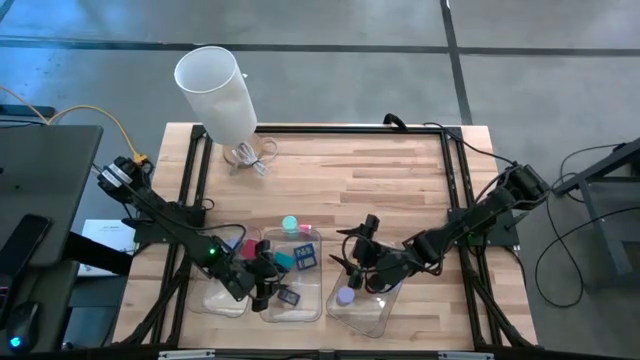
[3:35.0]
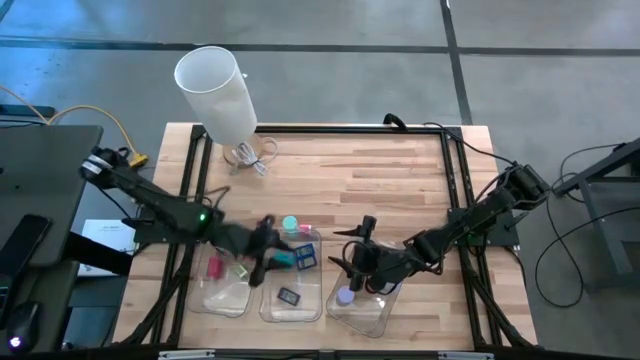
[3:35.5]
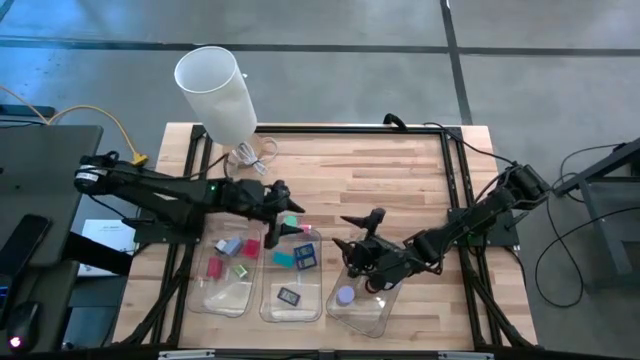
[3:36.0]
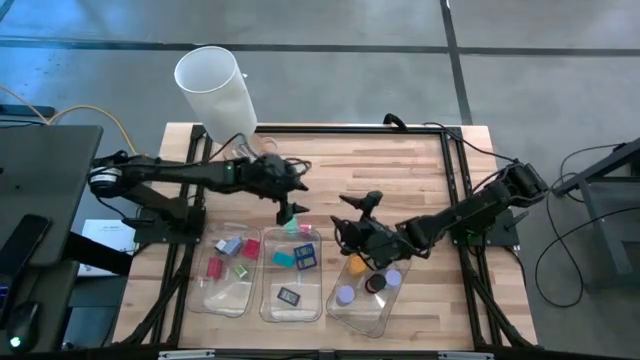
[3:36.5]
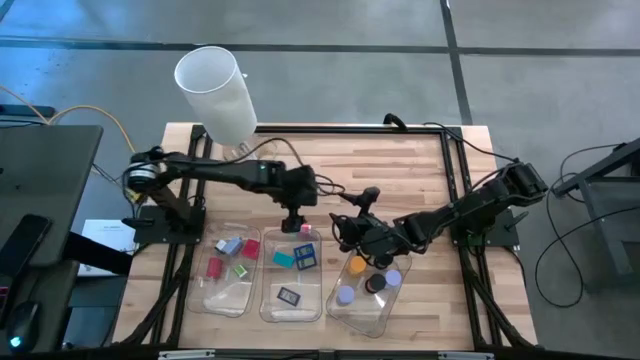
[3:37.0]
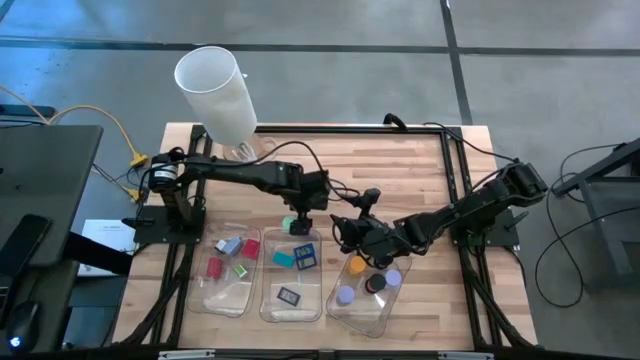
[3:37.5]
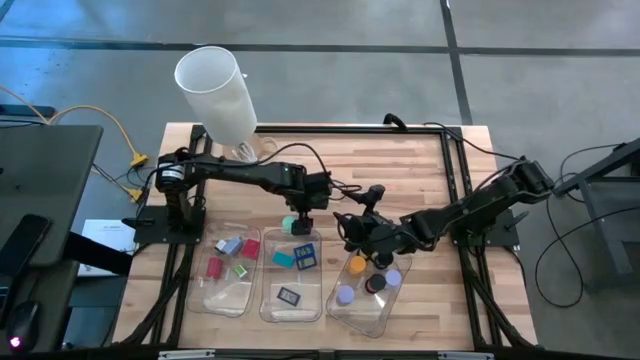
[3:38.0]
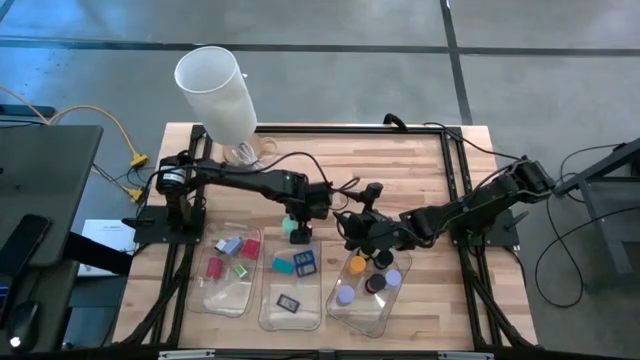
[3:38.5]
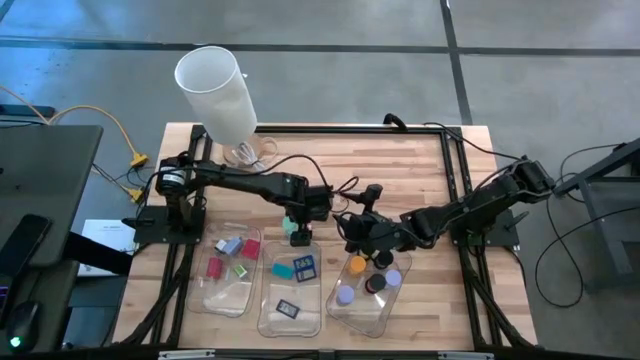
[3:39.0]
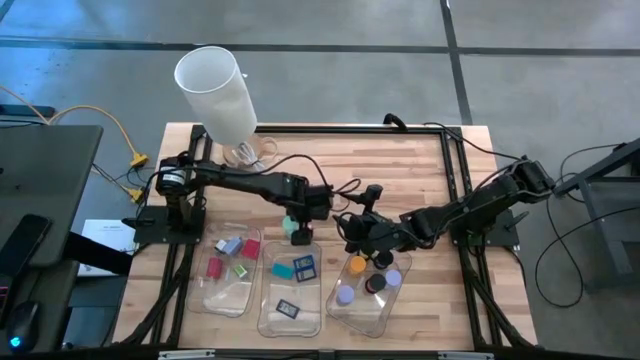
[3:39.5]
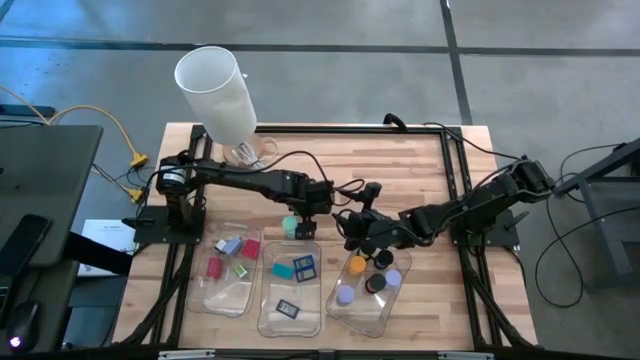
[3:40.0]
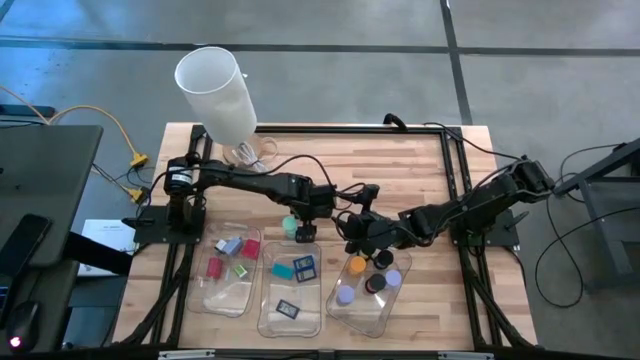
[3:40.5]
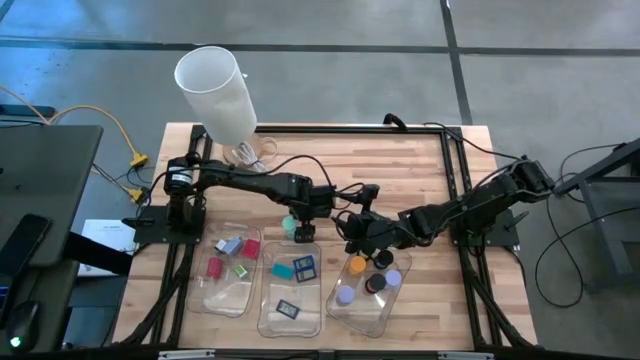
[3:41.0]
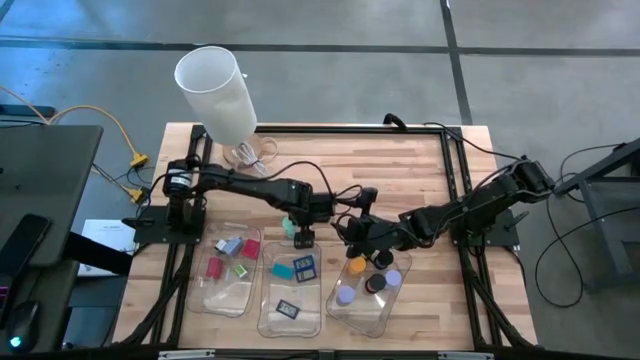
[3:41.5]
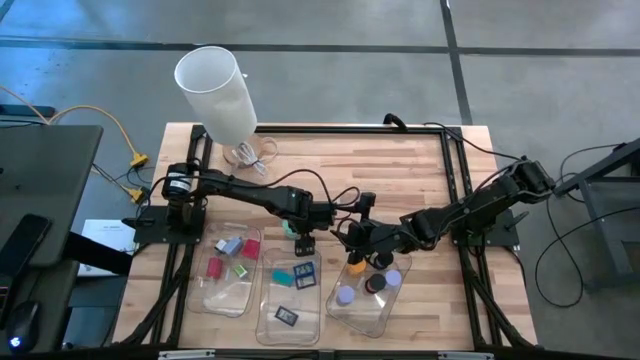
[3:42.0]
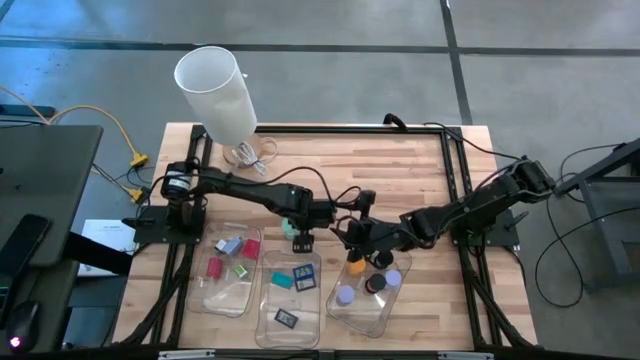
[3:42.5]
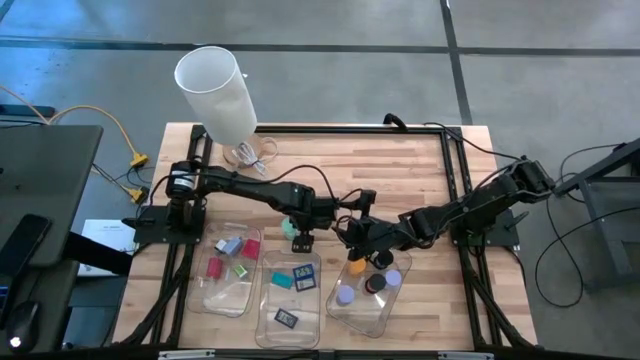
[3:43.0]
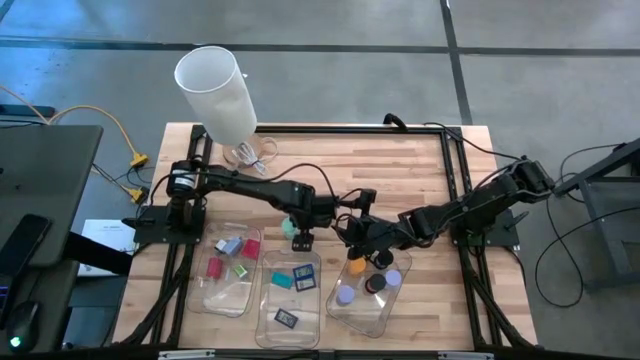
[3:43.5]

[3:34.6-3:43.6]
Task: Pick & Place Office items
Adjust the middle bin

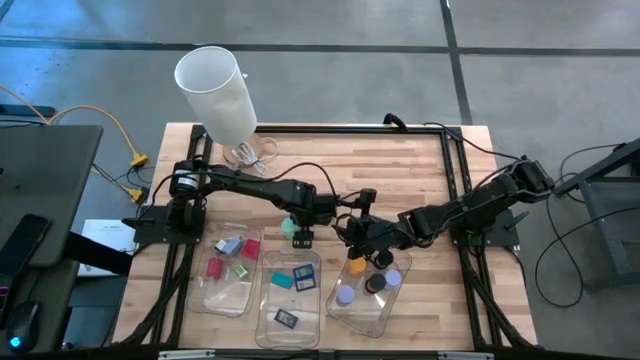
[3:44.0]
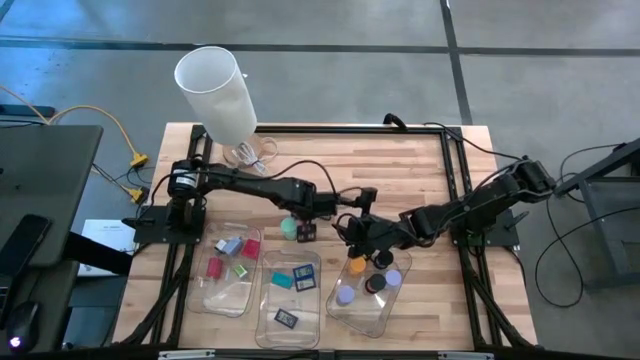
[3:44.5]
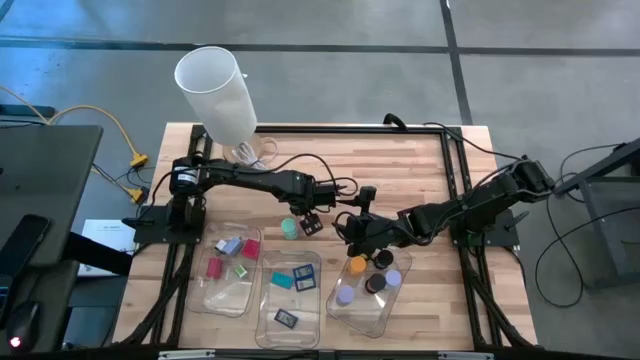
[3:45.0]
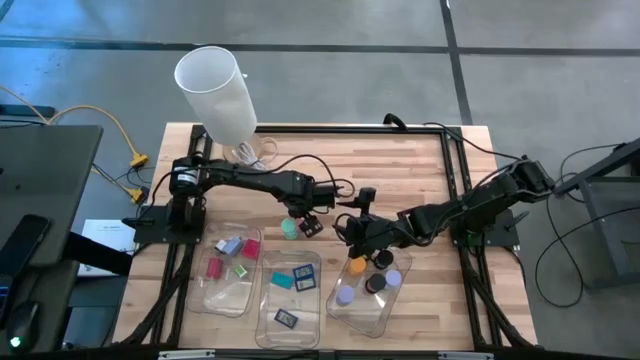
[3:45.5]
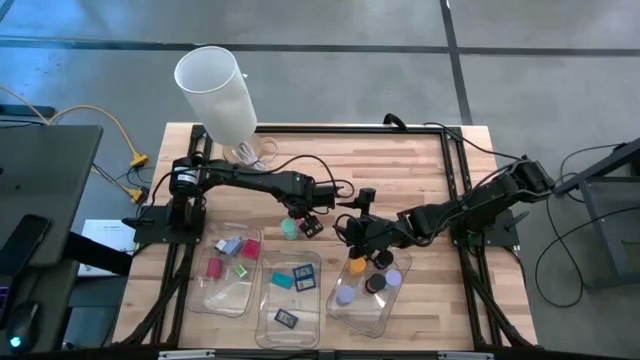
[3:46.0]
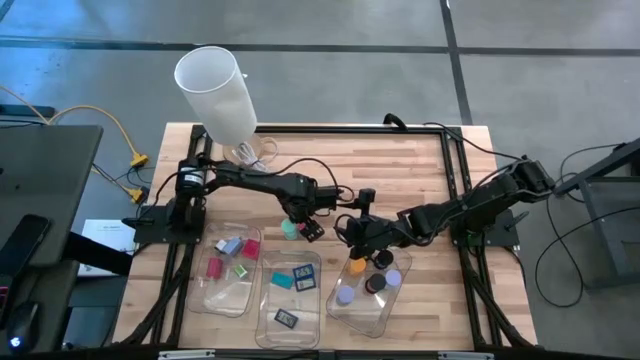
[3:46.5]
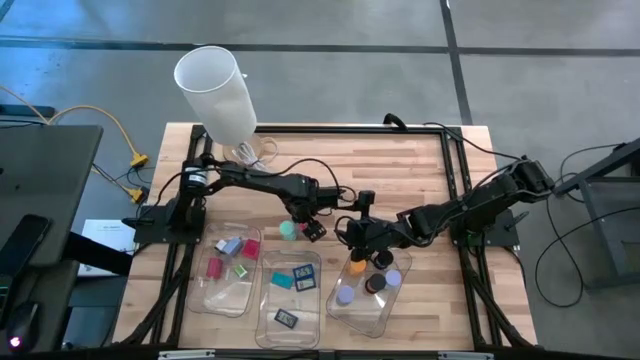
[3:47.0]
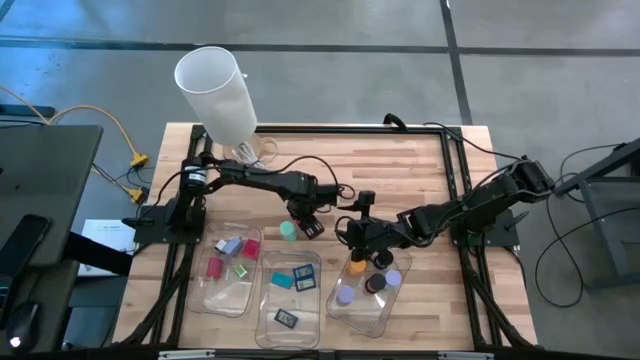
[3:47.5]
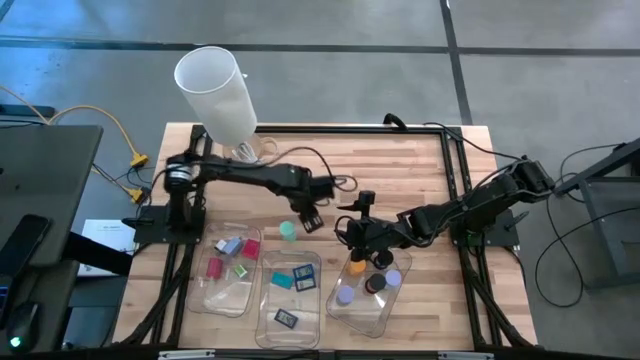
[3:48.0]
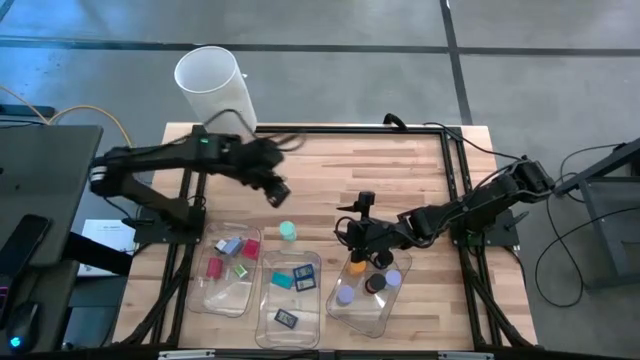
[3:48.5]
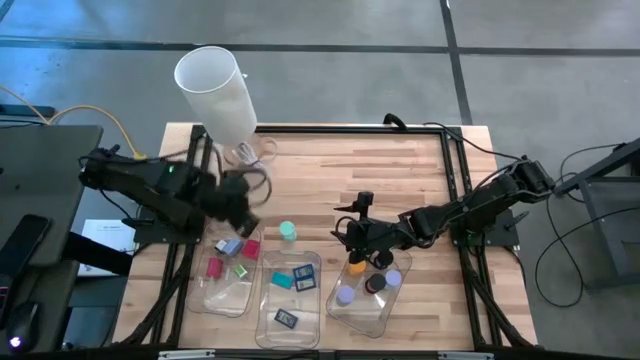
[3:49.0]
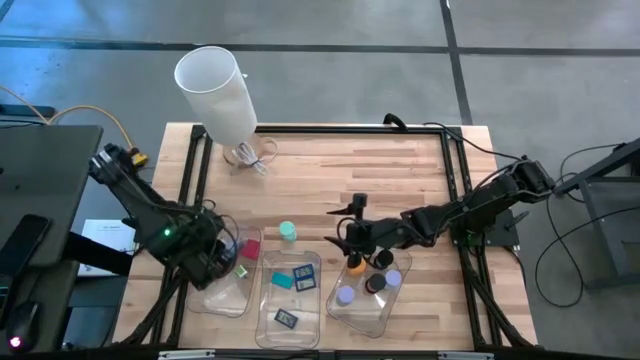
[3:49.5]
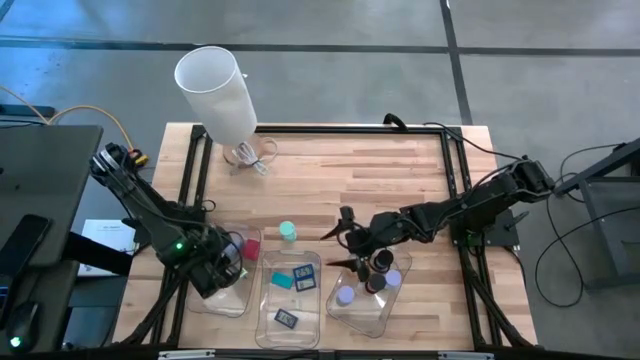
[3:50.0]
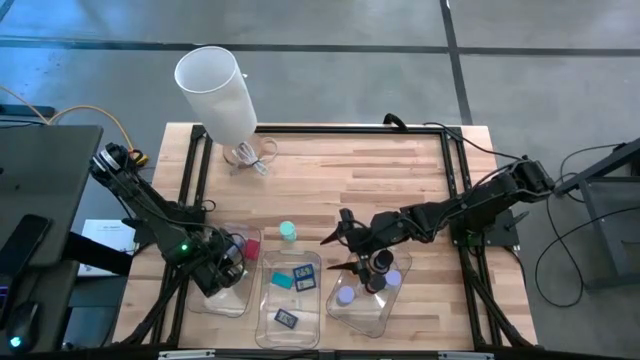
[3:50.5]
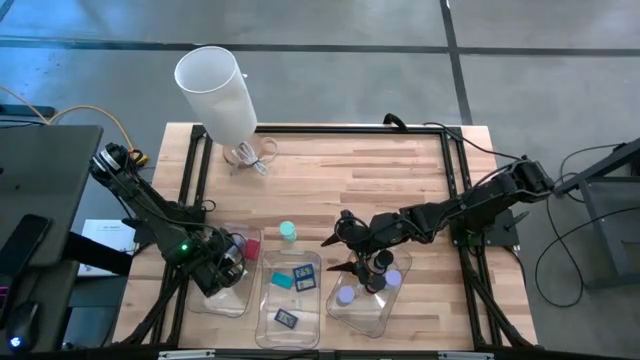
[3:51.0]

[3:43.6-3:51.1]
Put the pink adapter into the left bin

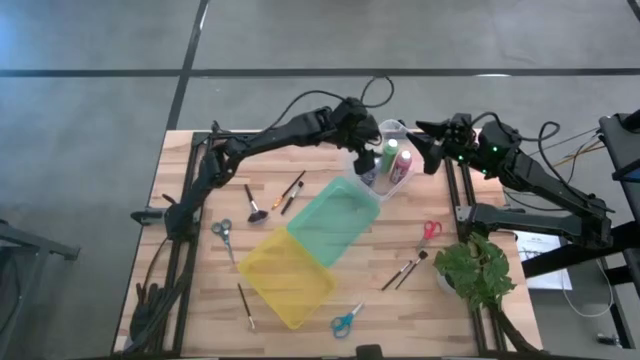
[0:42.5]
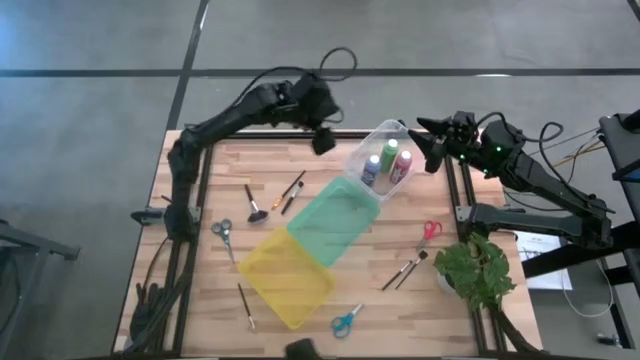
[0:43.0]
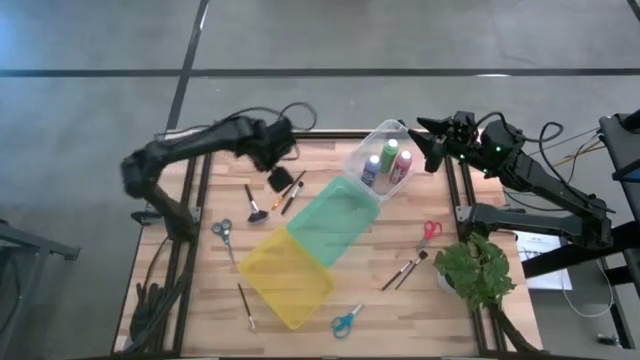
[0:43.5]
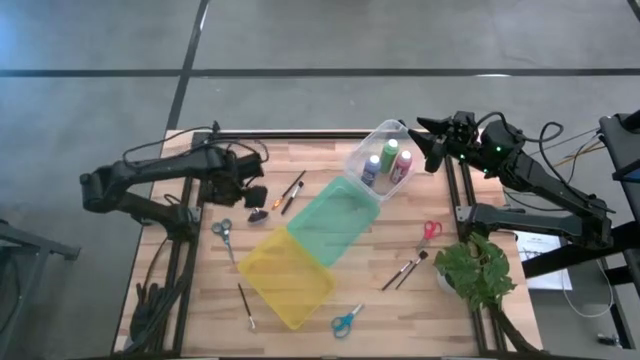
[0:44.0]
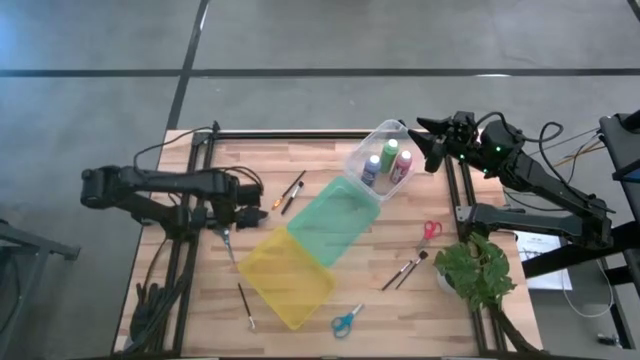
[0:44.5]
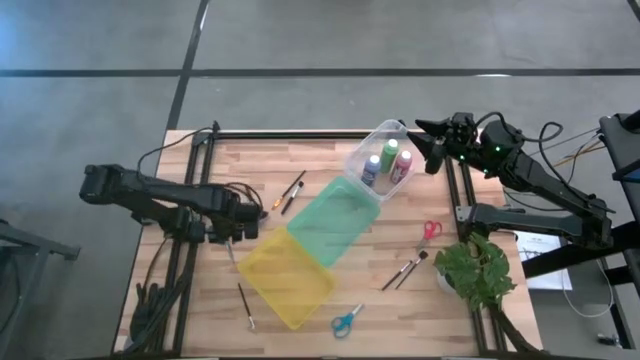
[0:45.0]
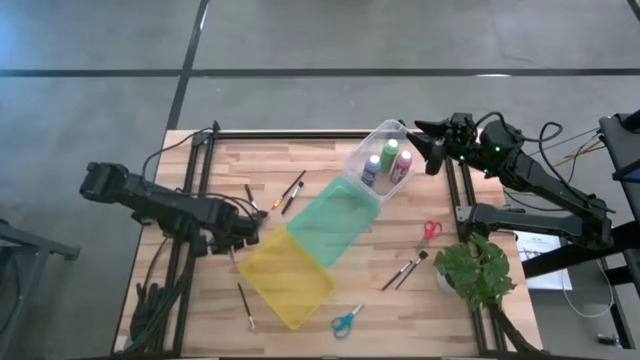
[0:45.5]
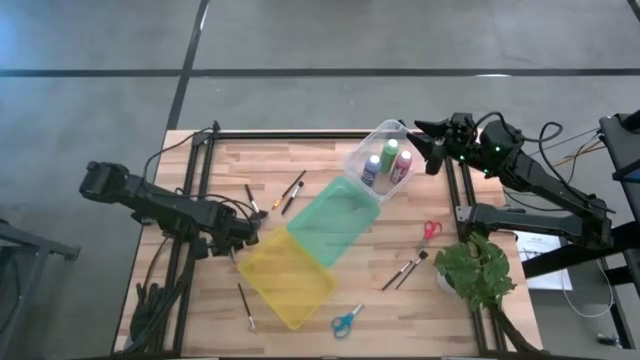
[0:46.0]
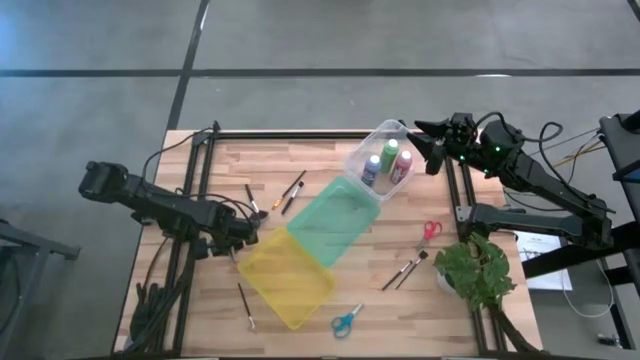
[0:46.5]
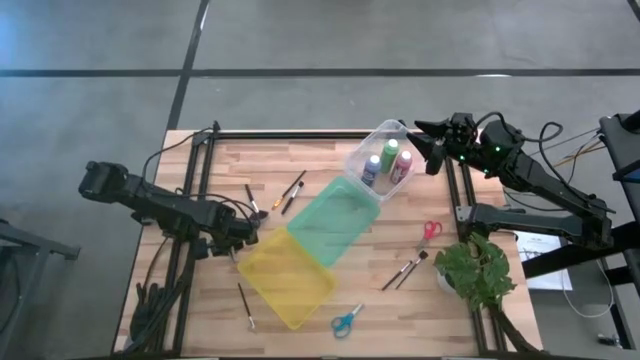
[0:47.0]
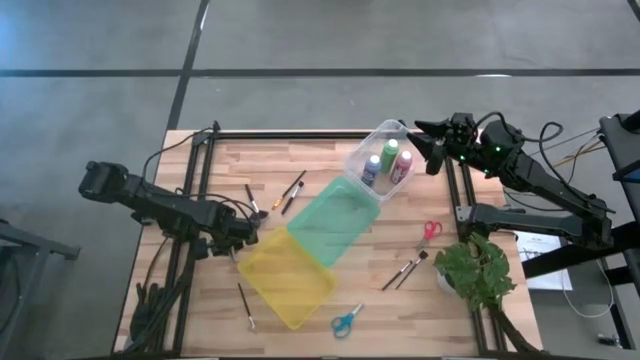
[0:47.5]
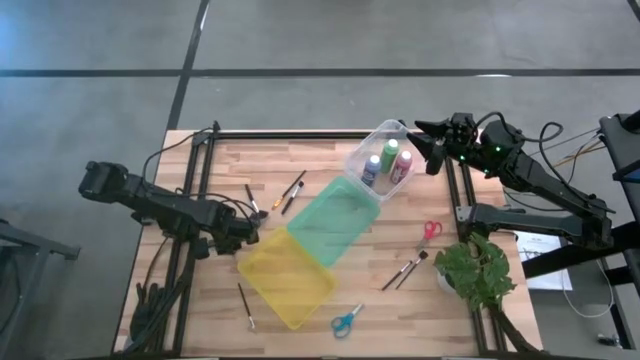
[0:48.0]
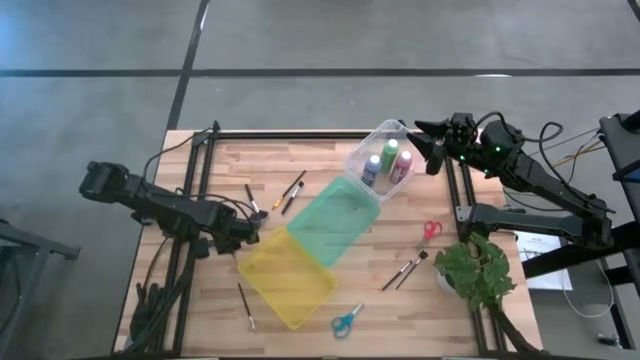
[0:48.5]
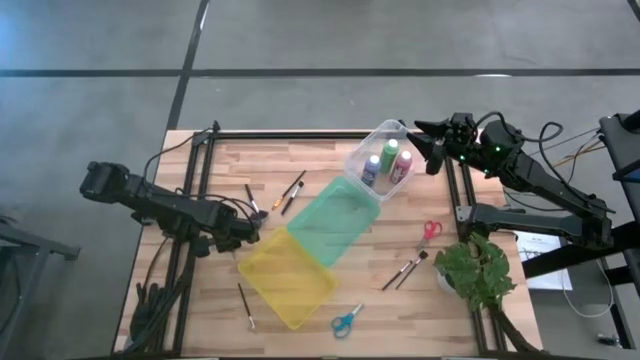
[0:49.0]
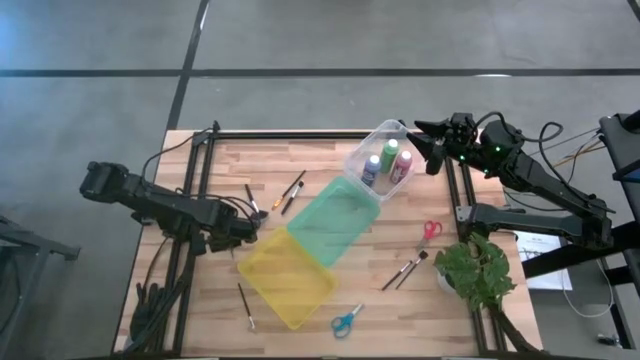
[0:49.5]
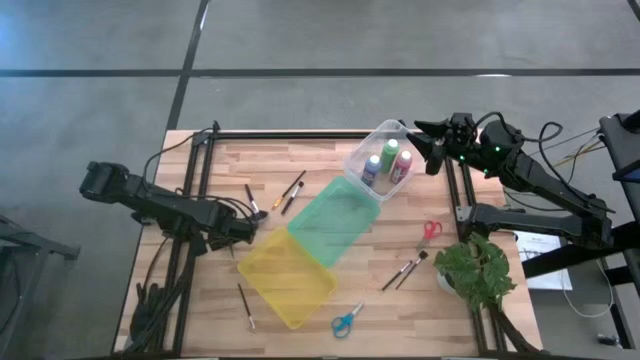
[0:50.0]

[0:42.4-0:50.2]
Task: Pick & Place Paint Supplies
Put the black and blue scissors into the yellow bin
